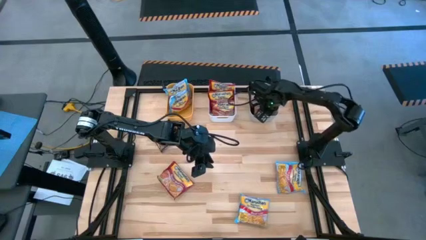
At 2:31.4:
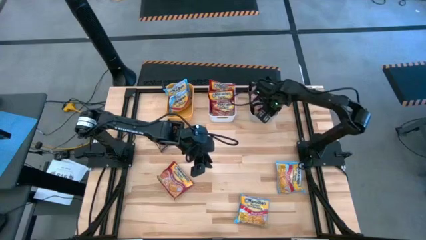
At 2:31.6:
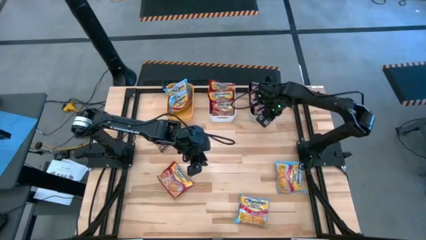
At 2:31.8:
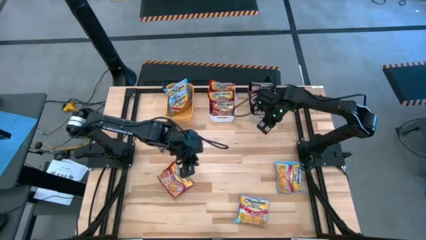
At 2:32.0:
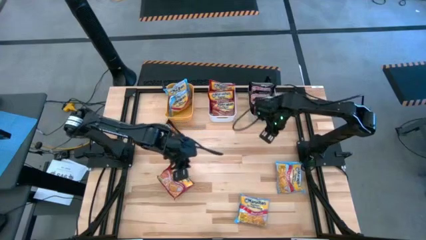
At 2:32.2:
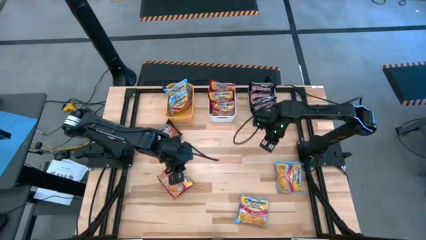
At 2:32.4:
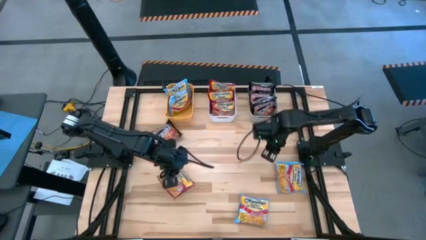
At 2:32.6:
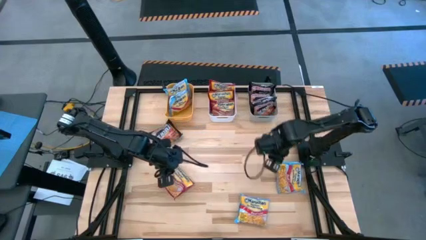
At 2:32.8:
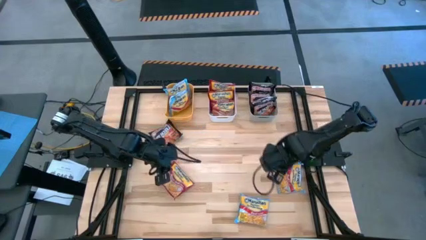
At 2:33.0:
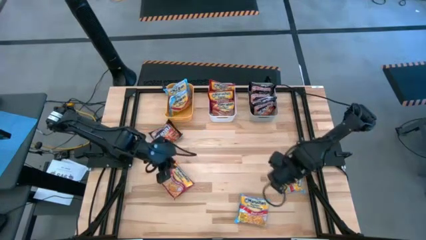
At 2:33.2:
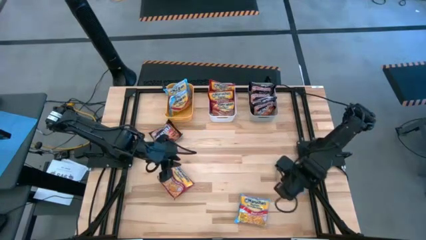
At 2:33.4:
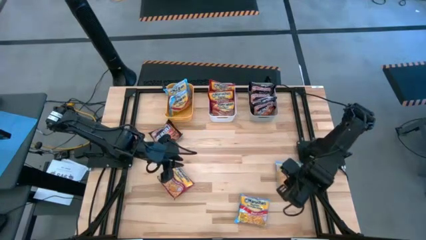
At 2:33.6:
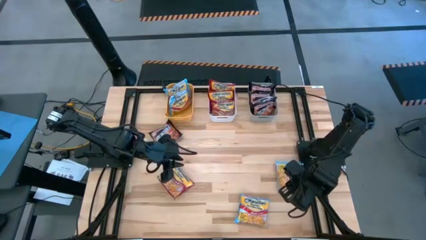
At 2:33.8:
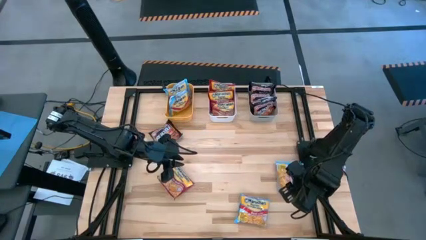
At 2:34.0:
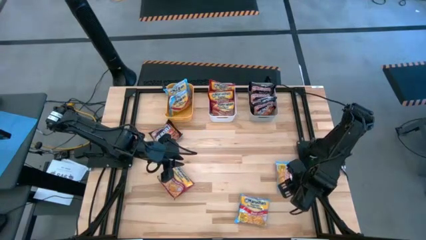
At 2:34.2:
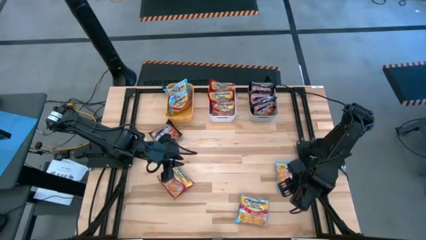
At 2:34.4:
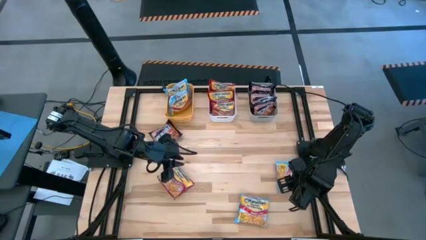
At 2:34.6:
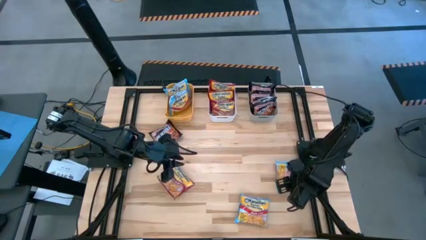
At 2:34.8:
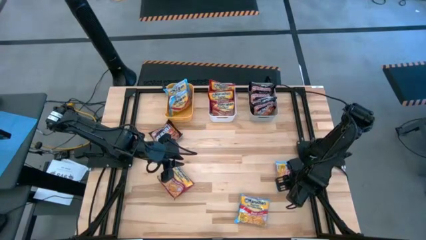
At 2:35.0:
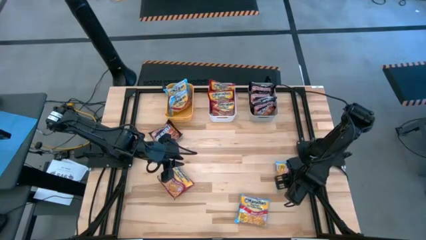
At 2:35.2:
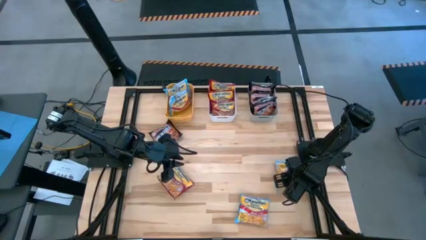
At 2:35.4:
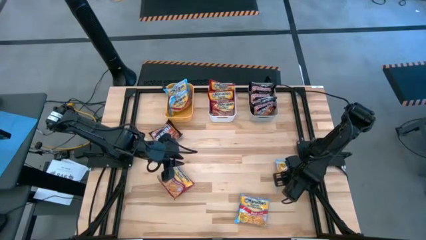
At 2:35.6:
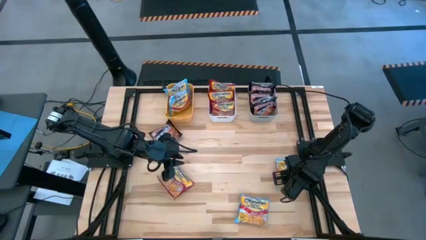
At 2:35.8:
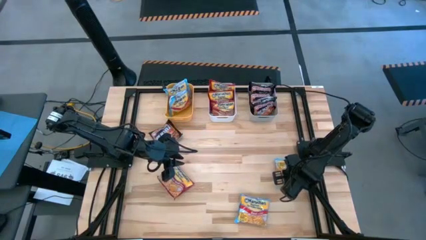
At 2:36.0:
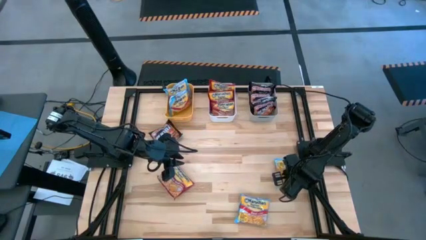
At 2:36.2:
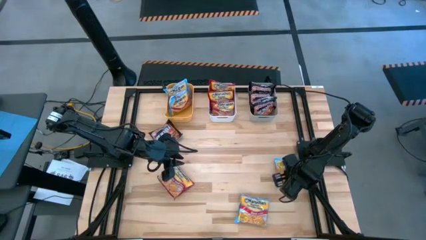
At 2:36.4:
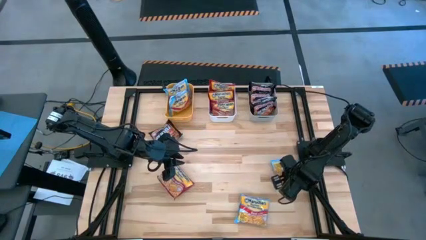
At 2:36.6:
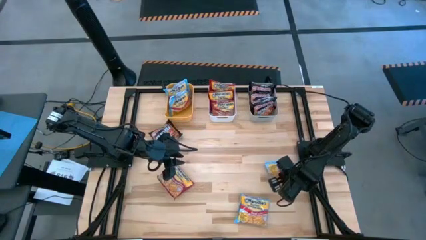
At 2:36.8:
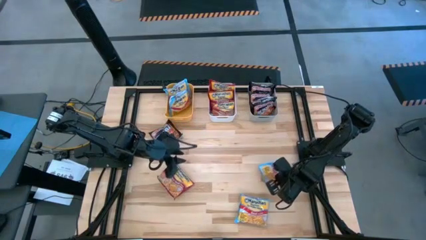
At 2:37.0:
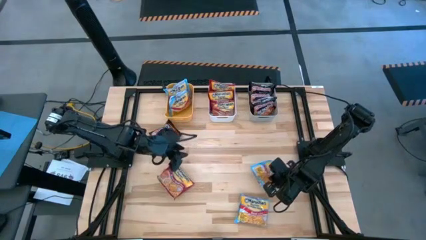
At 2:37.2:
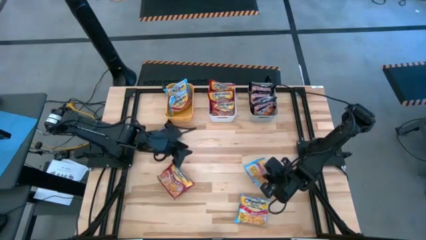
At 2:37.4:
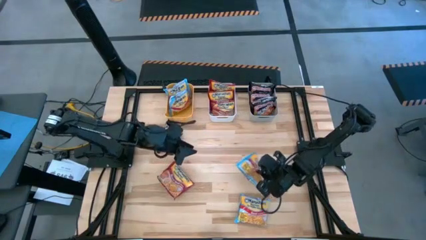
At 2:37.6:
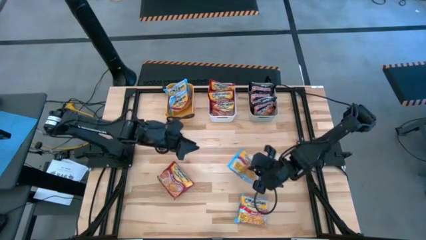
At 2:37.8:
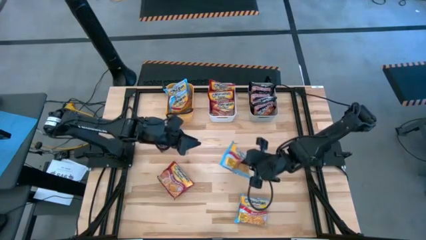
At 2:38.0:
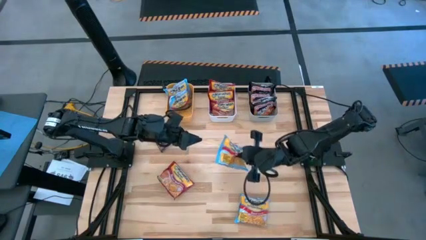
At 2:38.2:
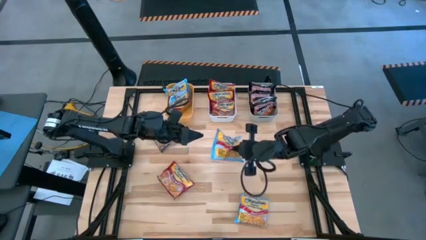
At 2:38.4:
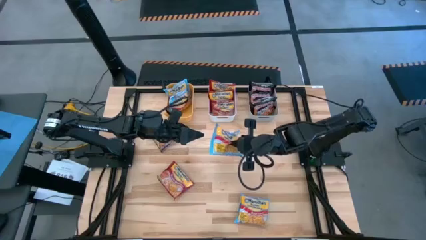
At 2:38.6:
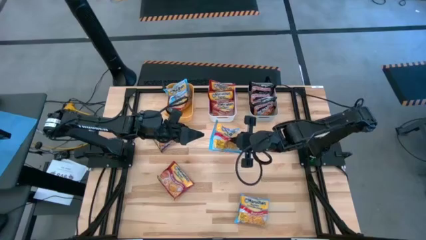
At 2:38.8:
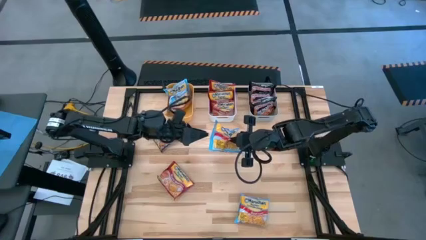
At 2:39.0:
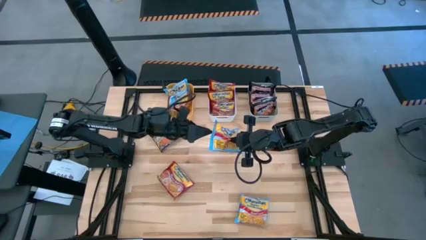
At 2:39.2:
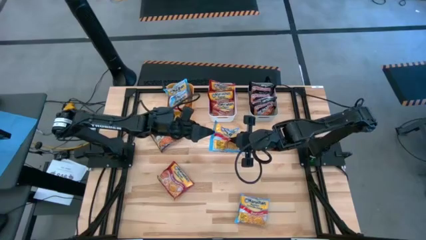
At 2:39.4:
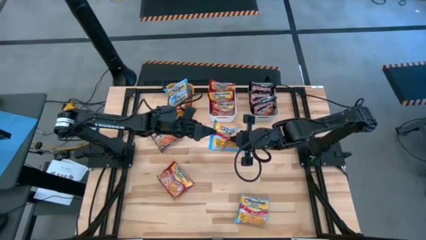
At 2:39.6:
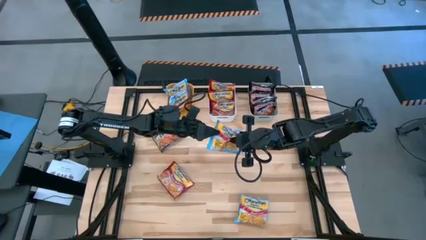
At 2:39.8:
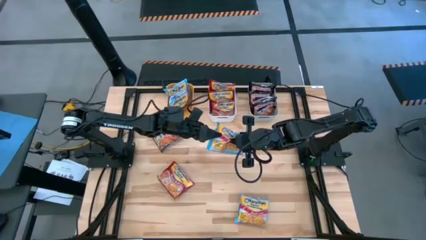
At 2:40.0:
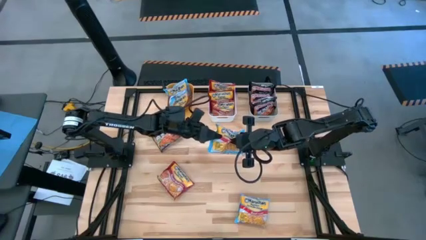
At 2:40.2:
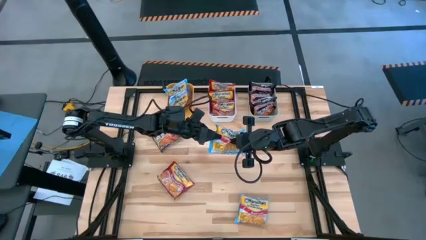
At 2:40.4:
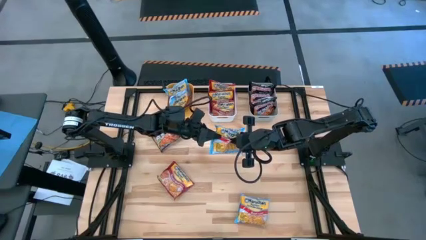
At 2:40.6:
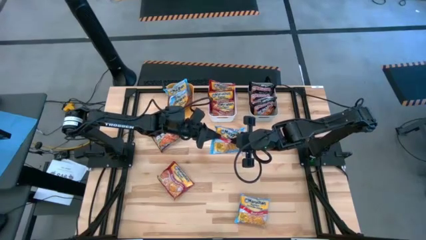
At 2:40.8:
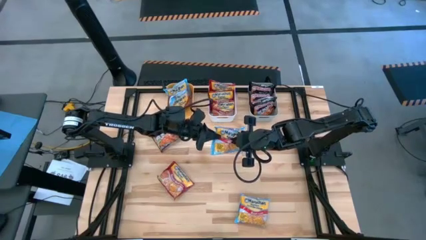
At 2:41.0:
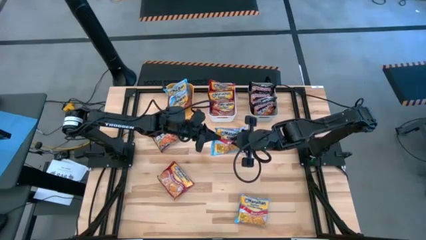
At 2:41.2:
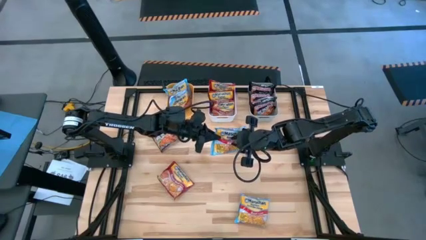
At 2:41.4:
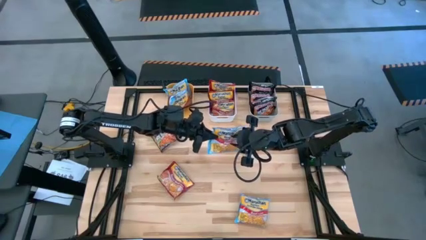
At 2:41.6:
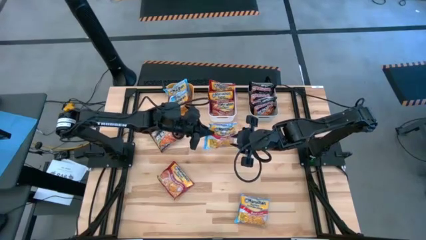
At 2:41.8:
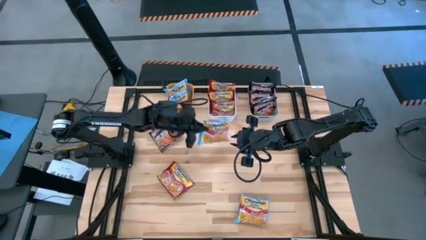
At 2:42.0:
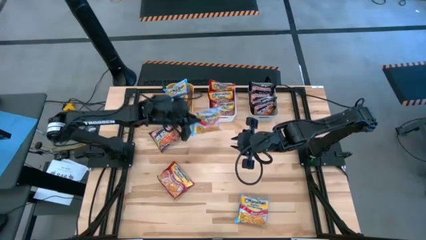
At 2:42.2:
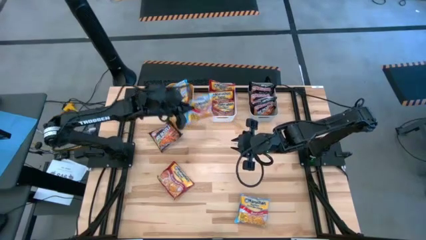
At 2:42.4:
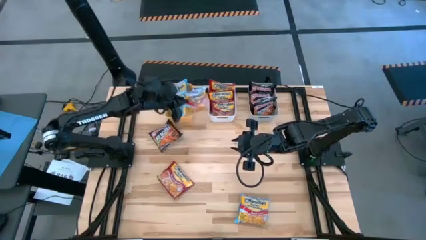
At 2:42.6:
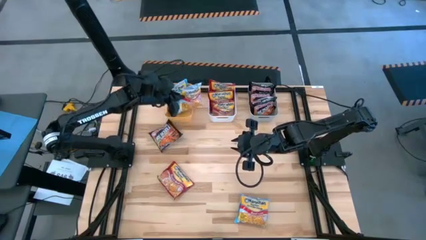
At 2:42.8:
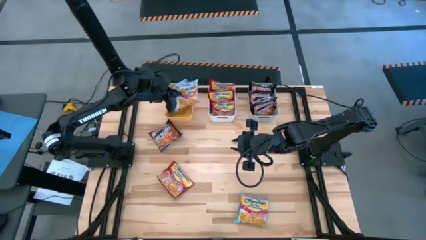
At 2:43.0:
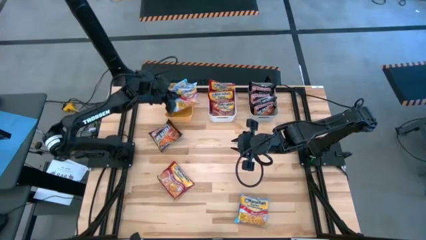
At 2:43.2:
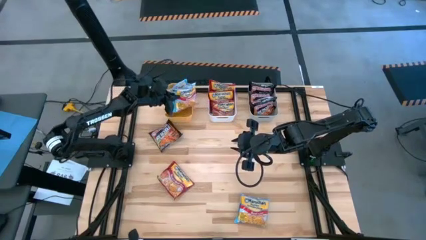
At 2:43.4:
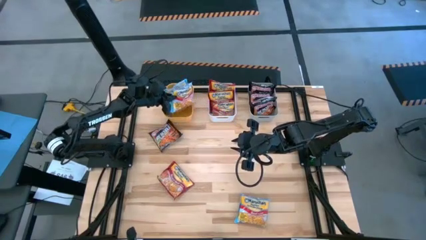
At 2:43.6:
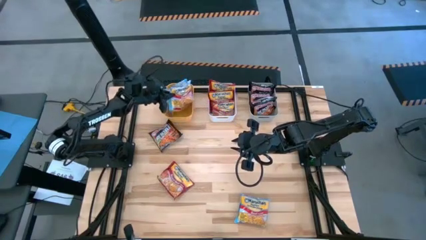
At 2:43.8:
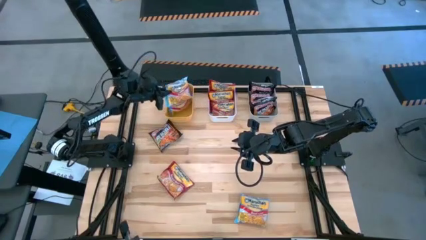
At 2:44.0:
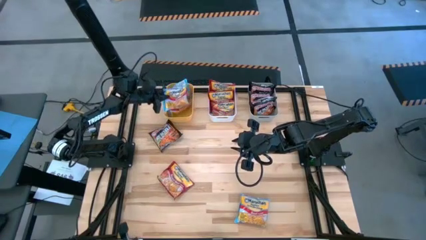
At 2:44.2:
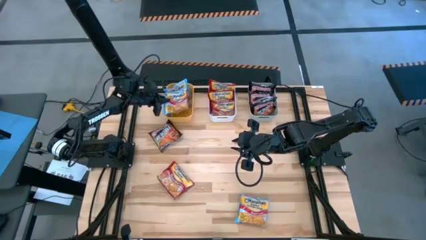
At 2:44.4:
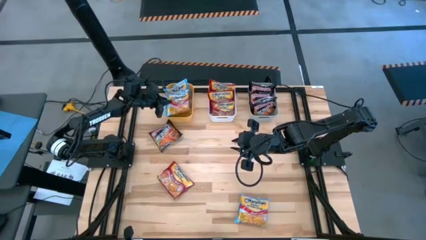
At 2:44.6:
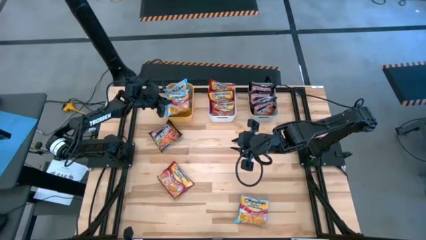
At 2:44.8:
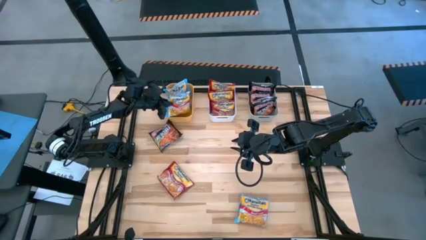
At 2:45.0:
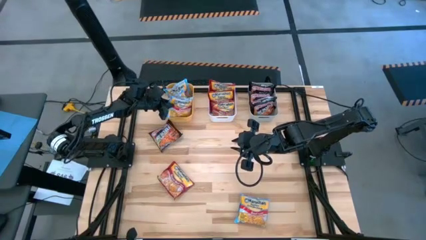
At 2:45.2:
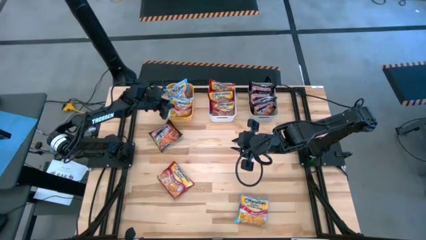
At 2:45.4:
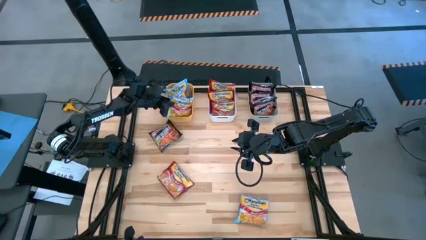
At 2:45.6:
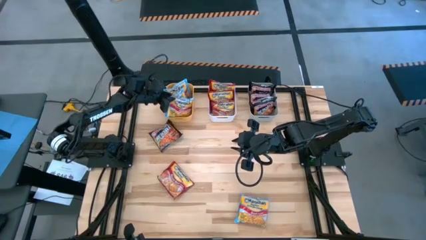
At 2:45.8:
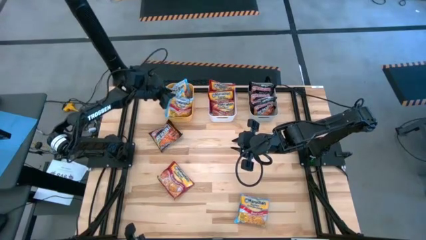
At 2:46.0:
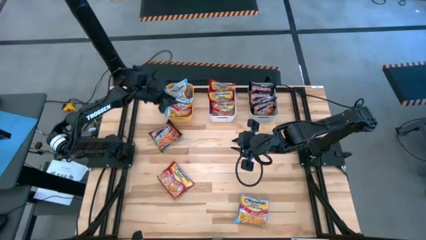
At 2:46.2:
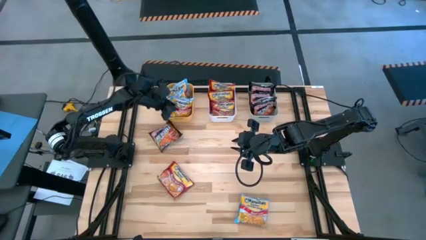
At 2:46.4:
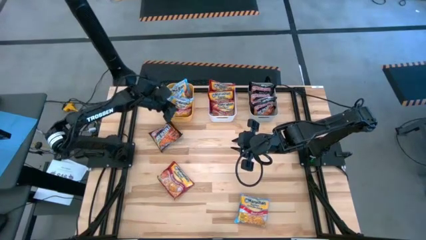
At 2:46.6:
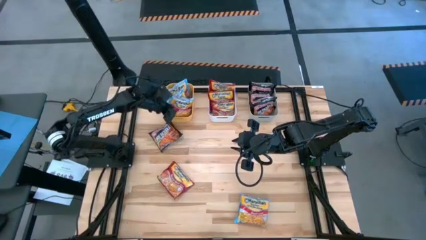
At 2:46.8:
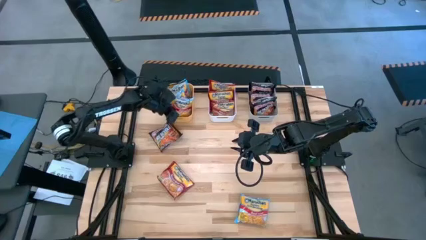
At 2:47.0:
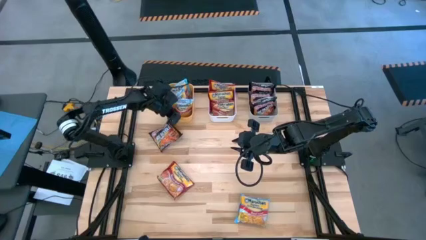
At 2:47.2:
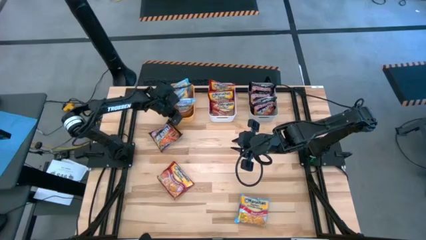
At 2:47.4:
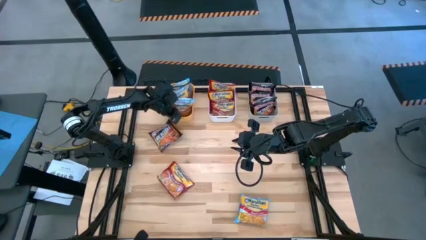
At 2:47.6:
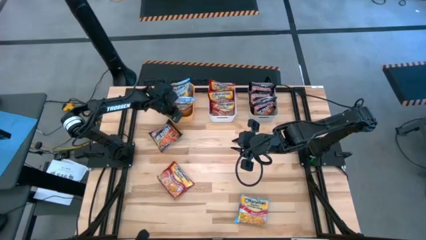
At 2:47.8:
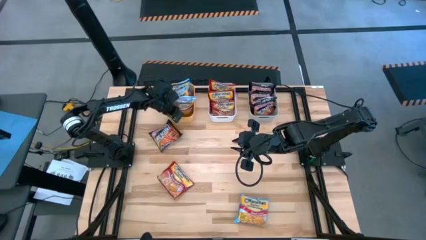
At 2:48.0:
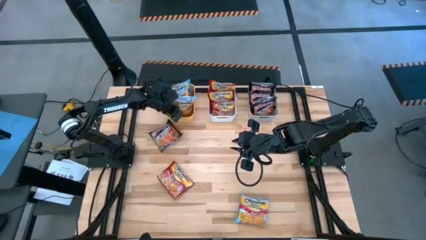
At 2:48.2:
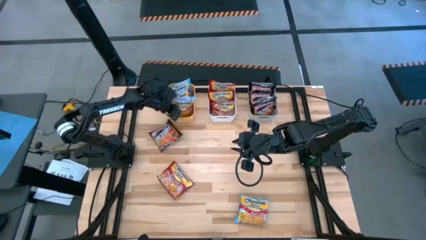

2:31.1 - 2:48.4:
Task: Sort Maruchan noodles
Put the blue noodle pack into the orange bin
